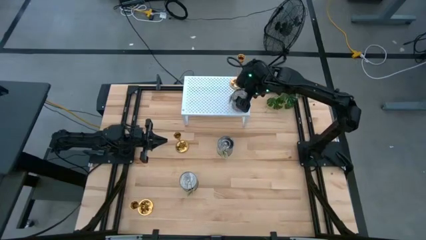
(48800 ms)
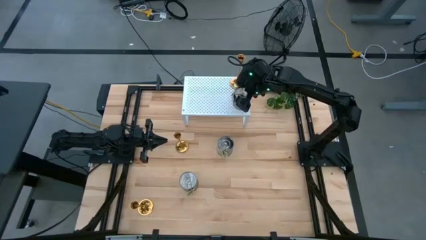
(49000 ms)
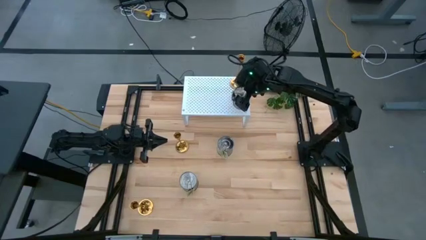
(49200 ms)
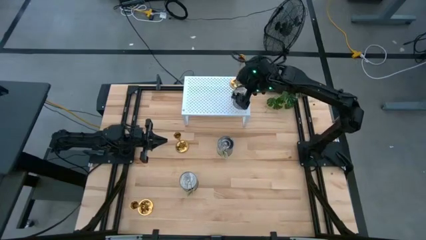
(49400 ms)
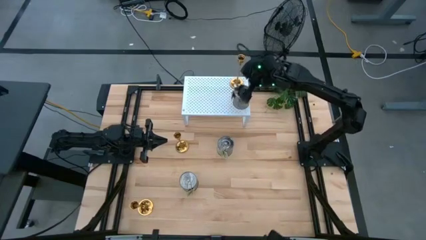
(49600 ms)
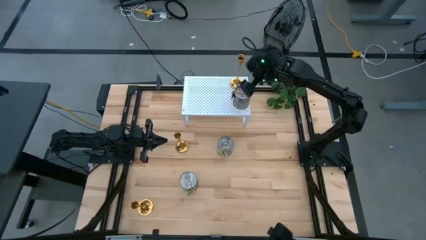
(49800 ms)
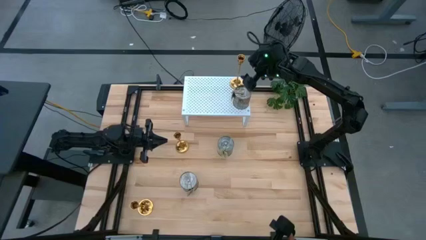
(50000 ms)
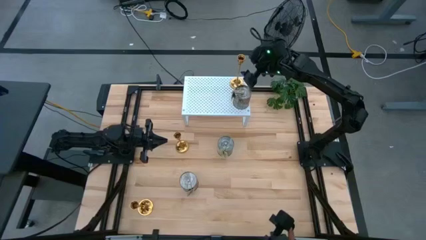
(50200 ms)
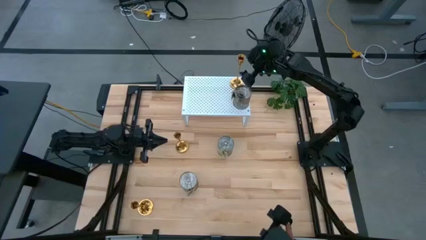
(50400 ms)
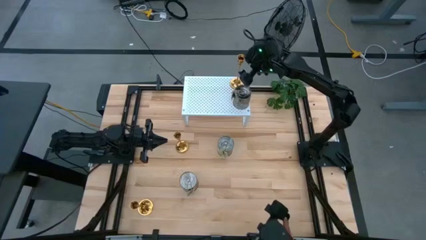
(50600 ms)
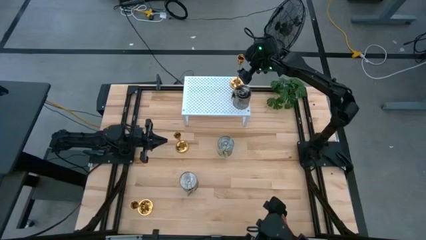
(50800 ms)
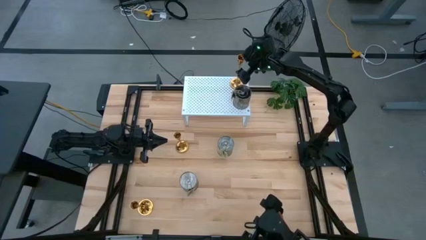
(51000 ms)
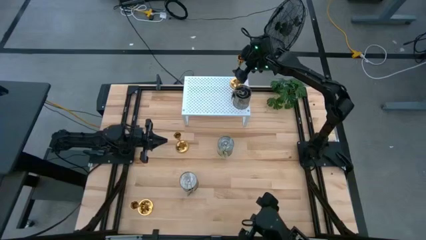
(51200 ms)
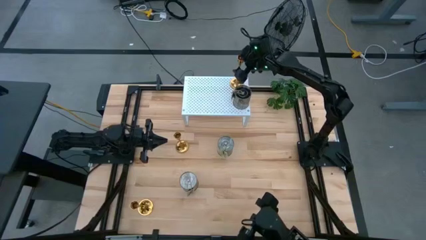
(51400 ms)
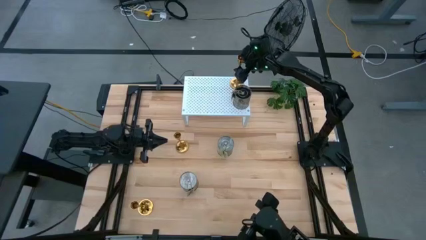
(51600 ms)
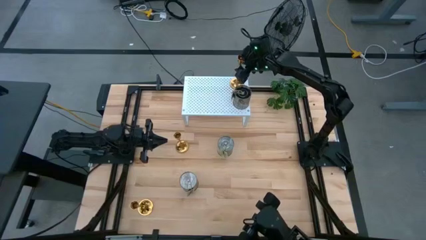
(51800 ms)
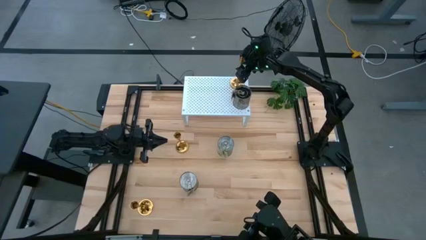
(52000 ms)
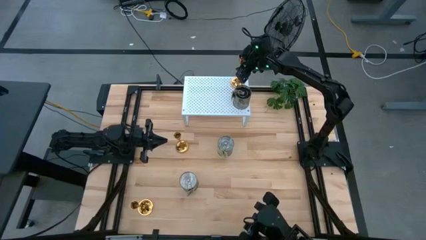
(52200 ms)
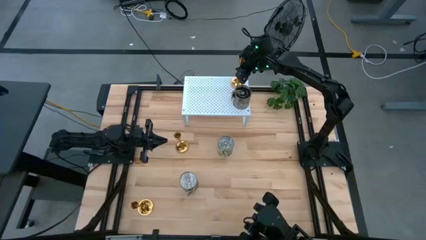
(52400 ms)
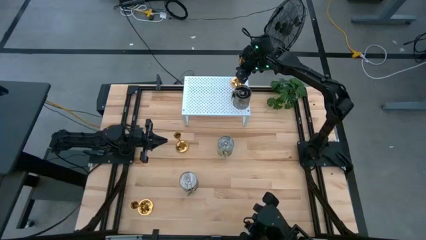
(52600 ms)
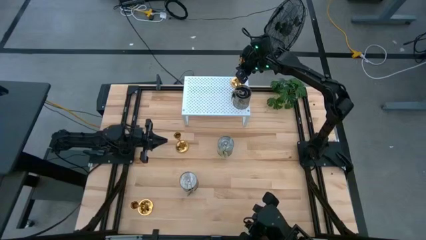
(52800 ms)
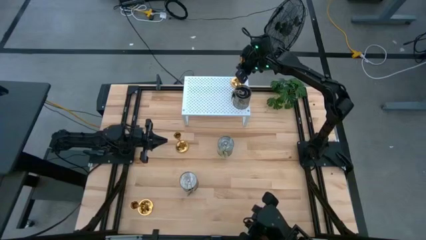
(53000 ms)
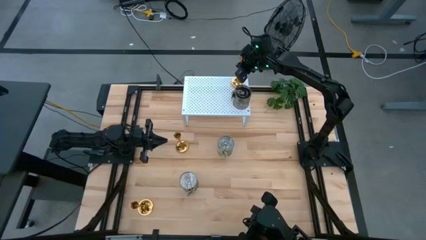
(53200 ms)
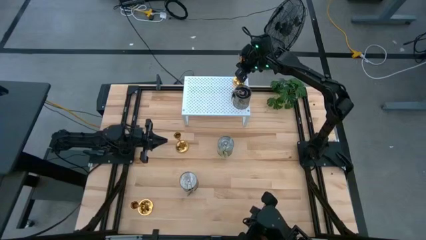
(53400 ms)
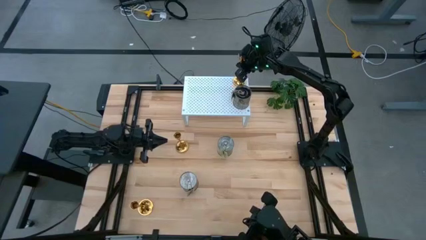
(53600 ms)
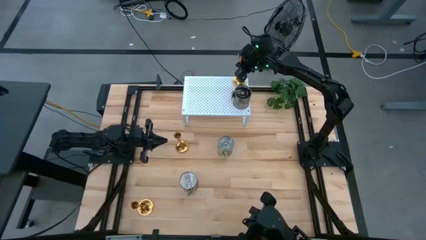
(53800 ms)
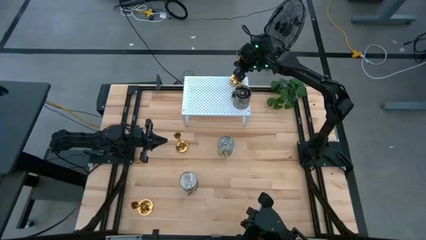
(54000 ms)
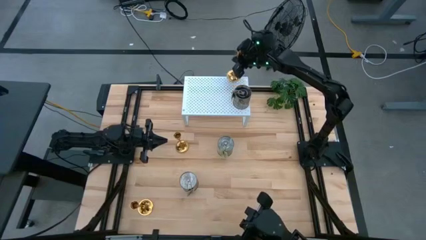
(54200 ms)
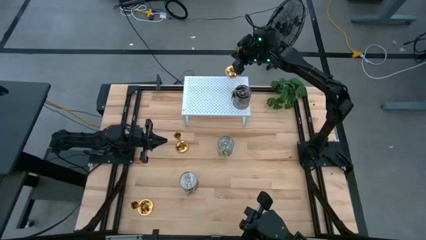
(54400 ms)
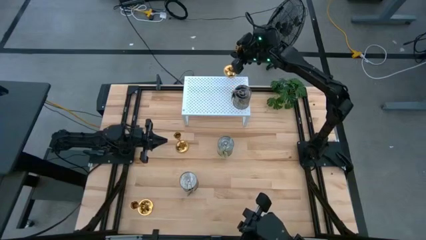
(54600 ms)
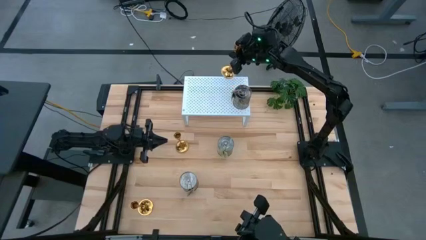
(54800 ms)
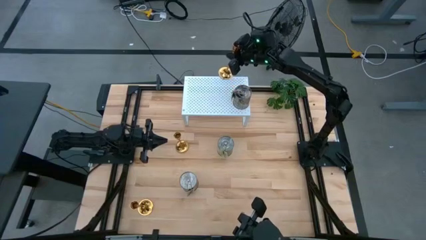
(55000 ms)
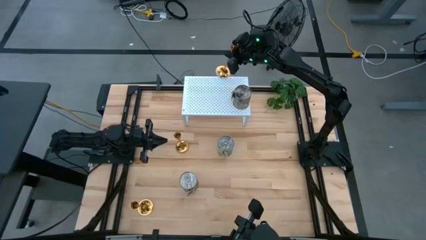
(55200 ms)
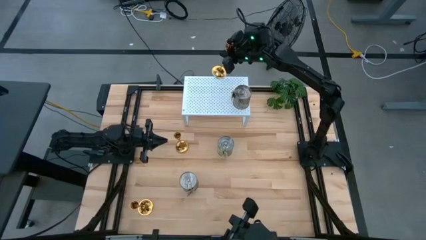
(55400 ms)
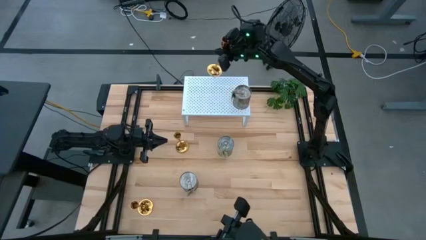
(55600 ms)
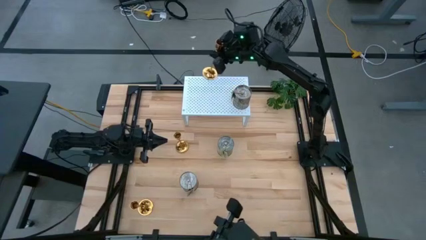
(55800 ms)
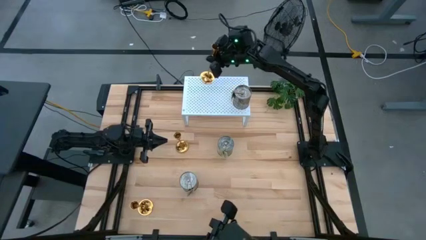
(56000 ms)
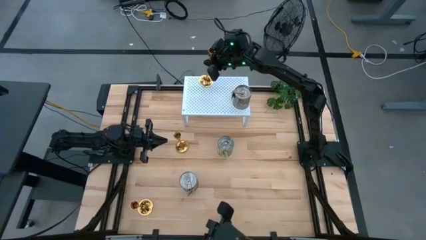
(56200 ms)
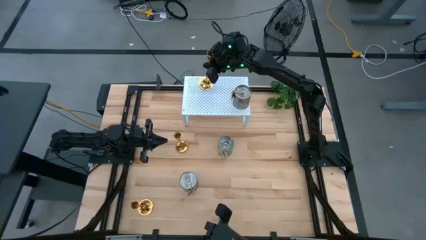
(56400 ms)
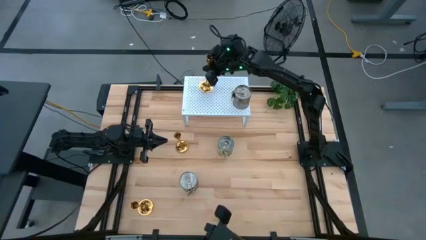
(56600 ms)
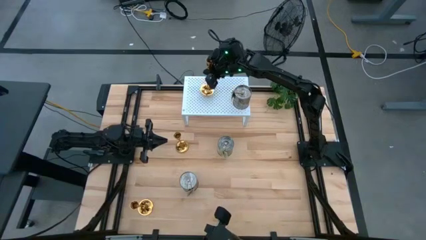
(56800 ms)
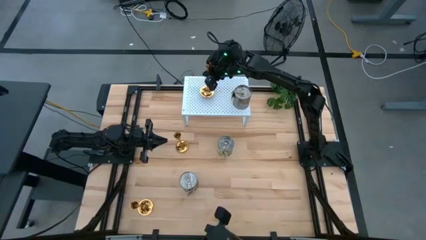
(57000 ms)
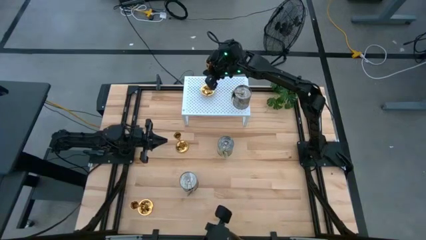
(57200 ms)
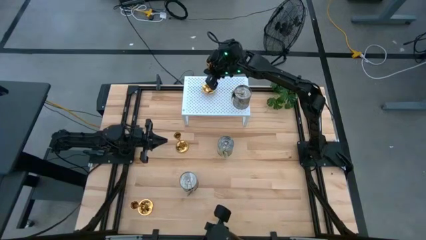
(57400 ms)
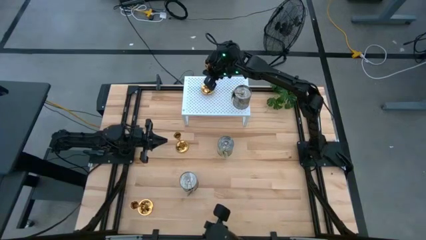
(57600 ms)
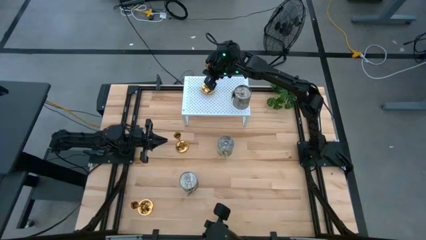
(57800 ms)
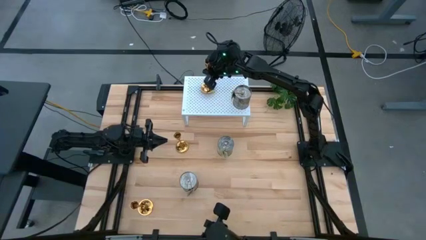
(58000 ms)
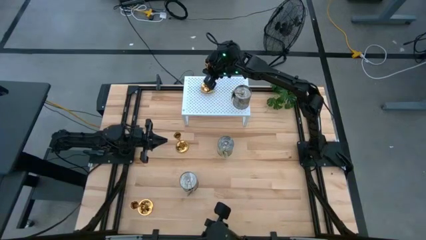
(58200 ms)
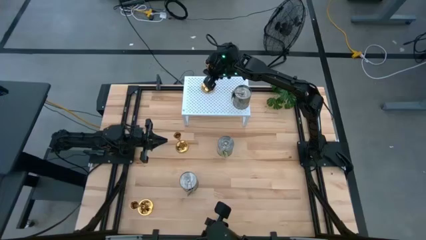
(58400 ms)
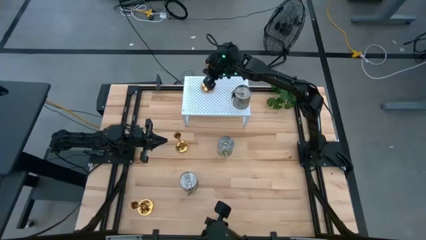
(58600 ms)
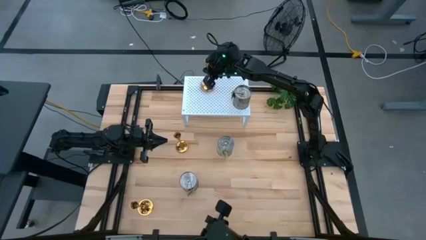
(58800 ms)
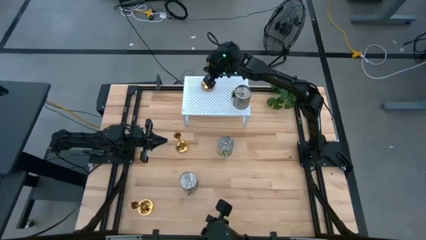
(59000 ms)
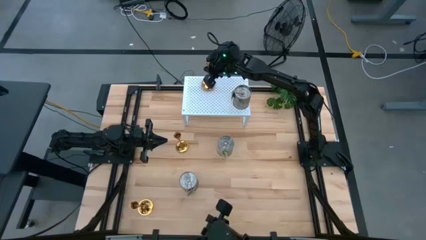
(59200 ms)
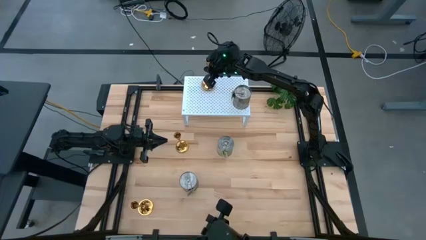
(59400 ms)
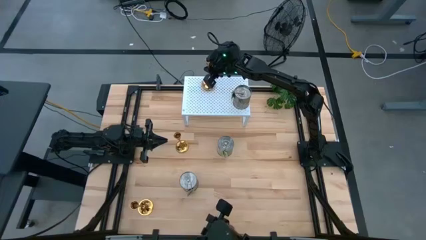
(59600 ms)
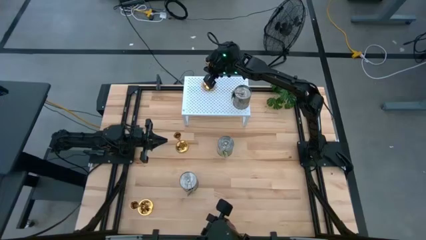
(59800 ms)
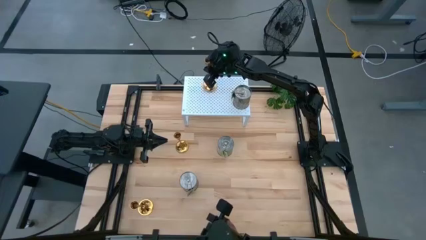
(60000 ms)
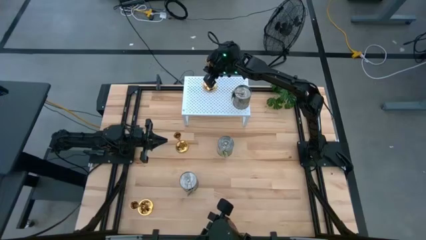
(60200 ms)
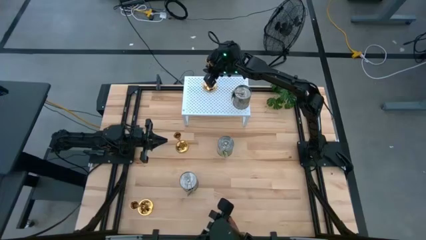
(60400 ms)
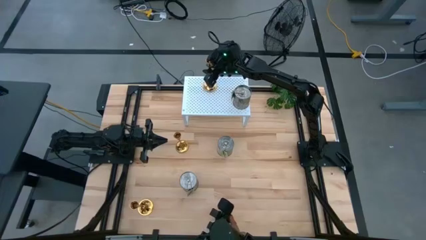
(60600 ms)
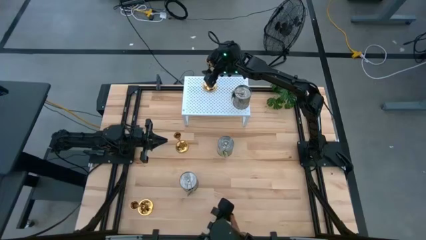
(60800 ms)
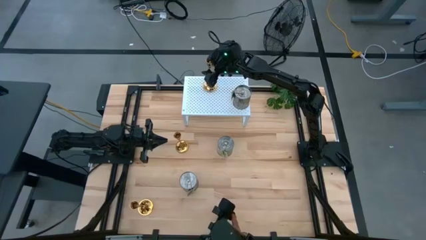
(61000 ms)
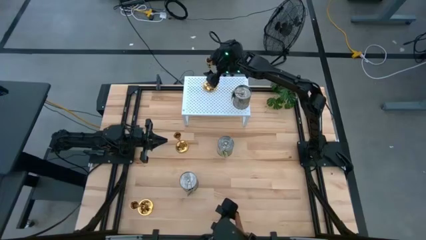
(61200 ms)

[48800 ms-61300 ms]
Task: Pick & Place candle stick holders
Adjust the candle holder on the shelf
